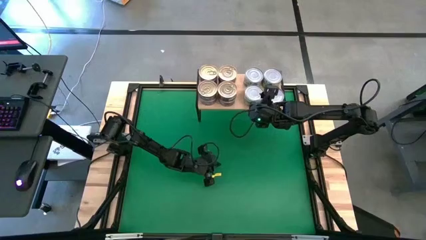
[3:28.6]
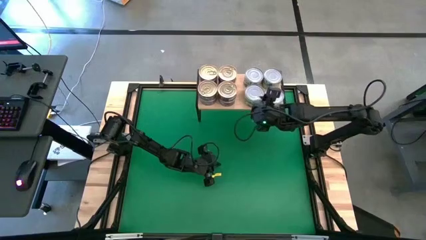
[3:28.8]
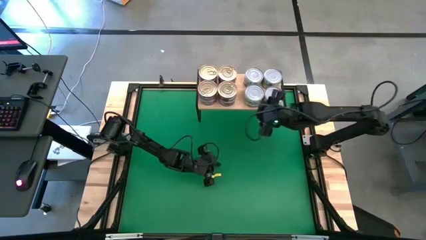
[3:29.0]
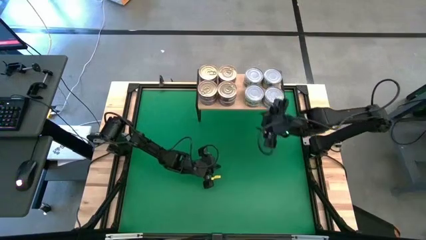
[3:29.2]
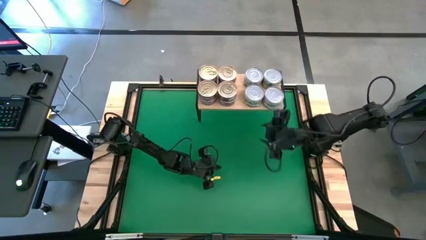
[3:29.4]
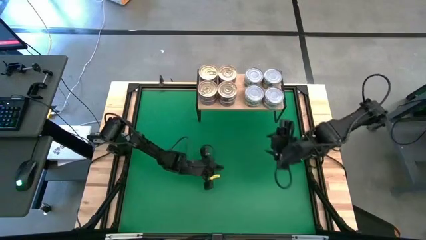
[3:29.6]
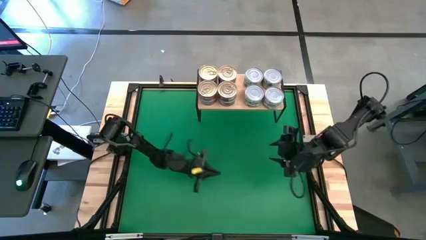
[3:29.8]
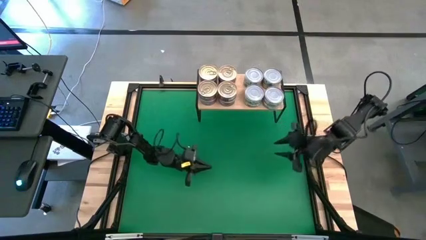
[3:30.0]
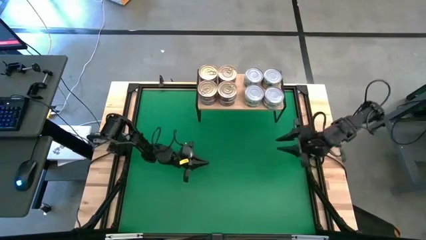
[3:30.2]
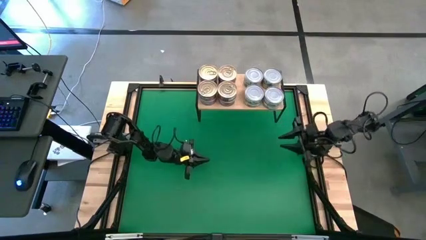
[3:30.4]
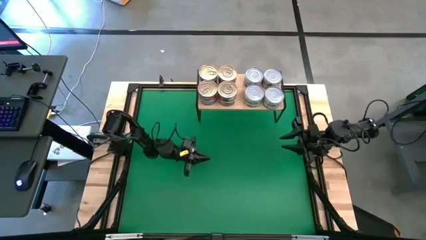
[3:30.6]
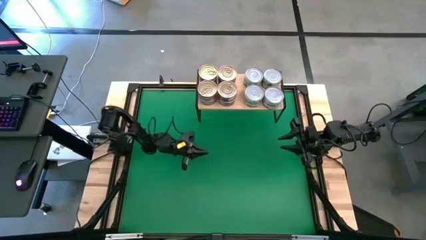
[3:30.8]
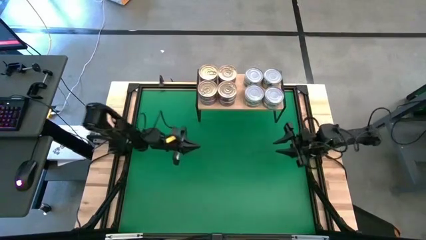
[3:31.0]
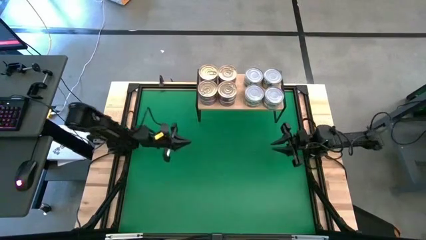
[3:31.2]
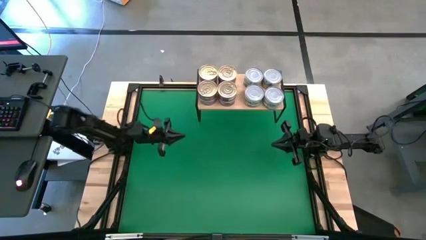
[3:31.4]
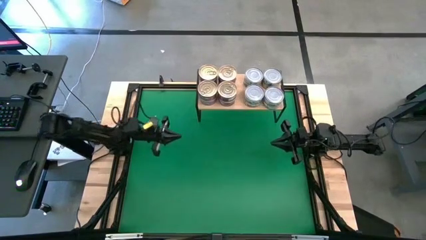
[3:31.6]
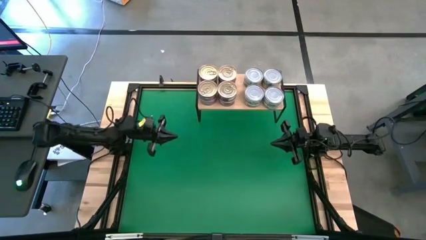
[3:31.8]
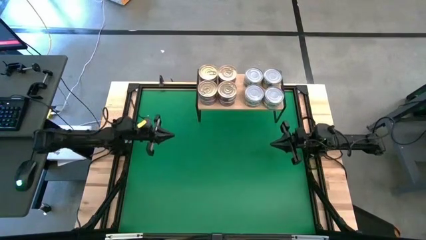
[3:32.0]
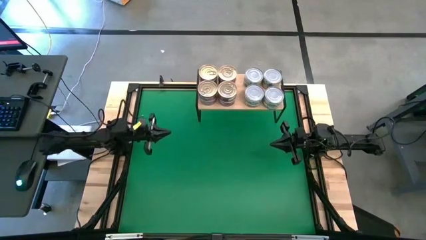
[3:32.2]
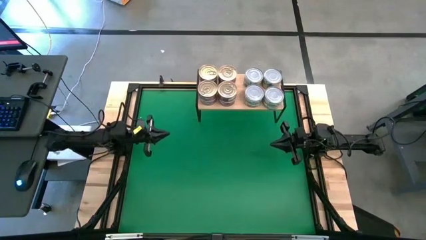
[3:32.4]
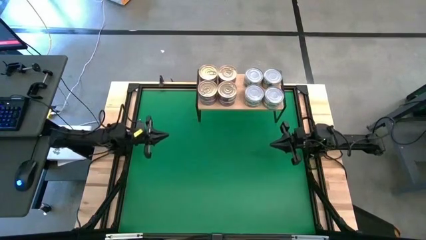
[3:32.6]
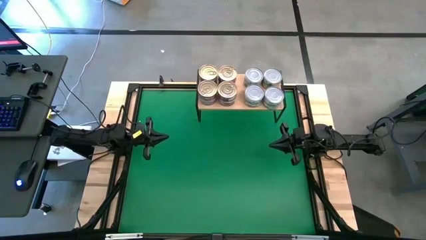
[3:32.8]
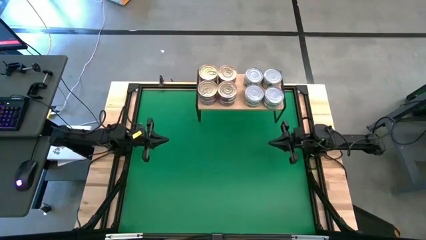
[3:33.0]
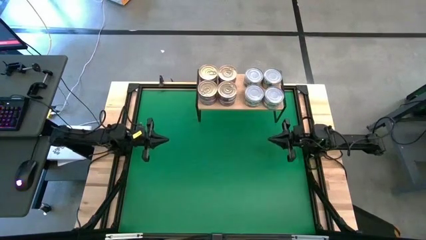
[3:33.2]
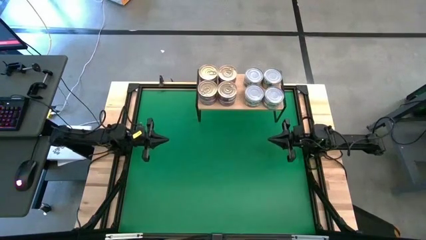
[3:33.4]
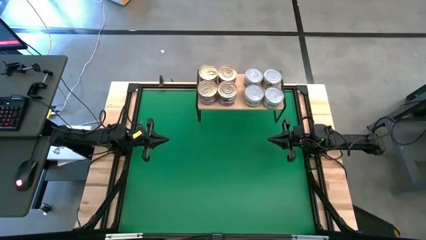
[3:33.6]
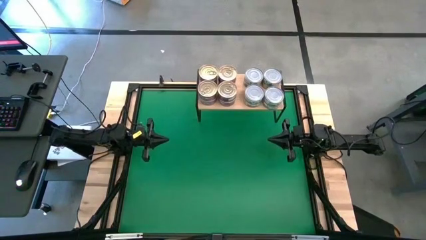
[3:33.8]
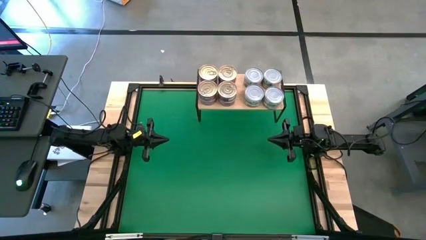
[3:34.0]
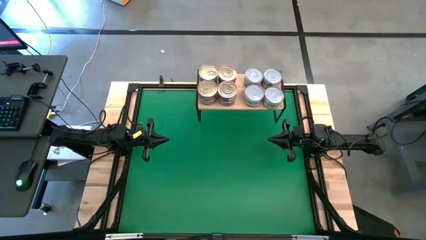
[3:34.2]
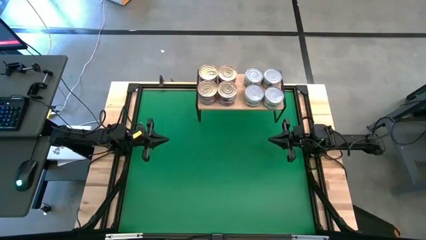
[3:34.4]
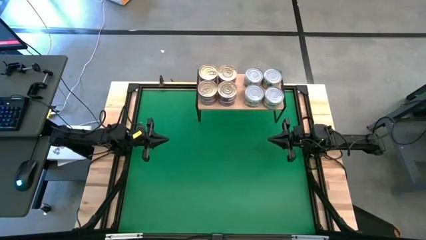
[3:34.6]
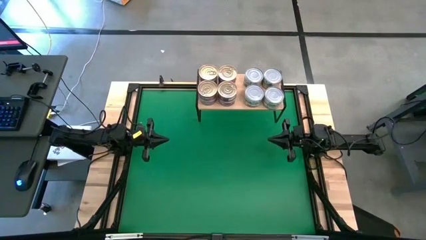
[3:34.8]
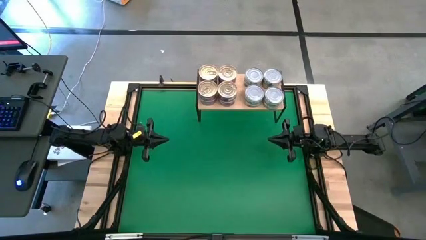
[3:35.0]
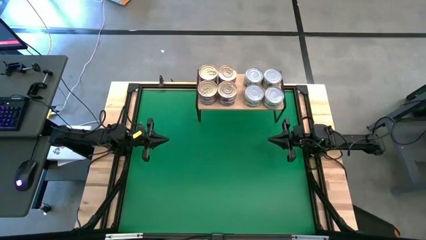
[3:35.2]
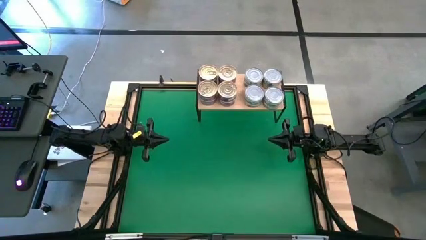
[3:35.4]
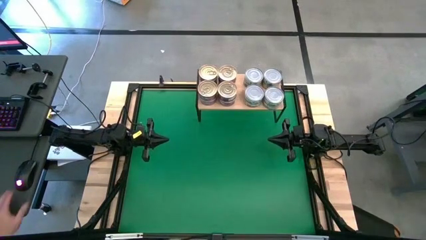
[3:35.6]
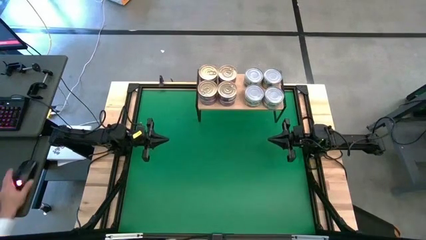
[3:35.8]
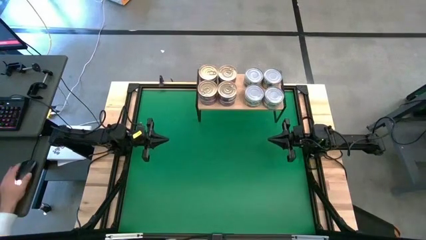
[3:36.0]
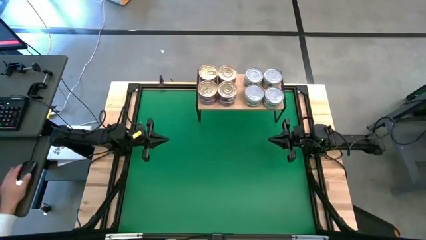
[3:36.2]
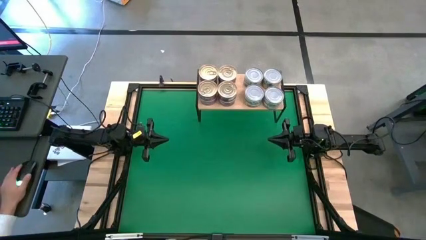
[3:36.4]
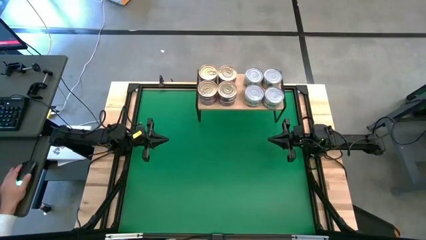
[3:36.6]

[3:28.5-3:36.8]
Task: Stack canned seafood by type on shelf
Return to Home Position

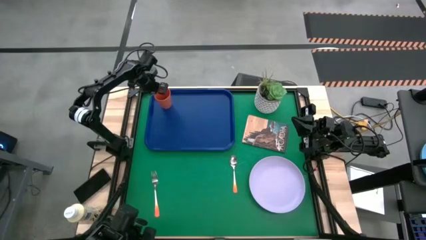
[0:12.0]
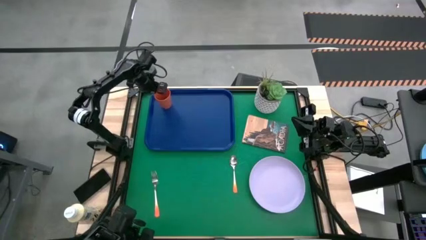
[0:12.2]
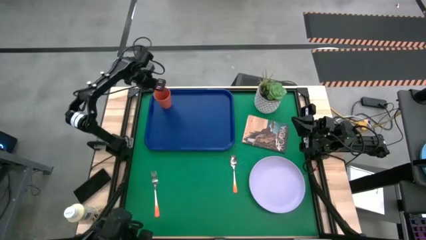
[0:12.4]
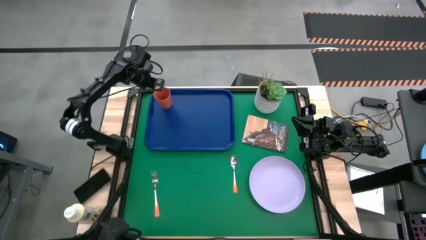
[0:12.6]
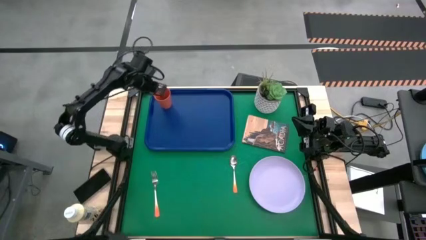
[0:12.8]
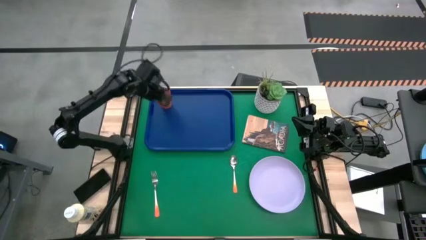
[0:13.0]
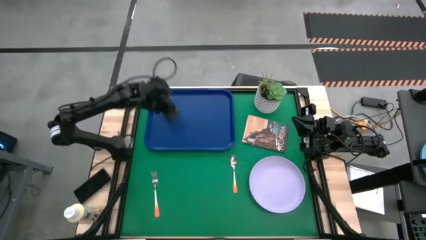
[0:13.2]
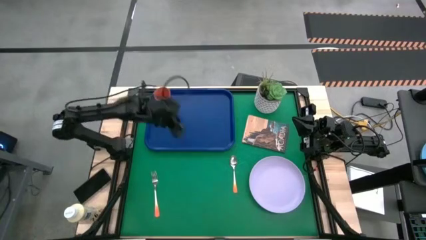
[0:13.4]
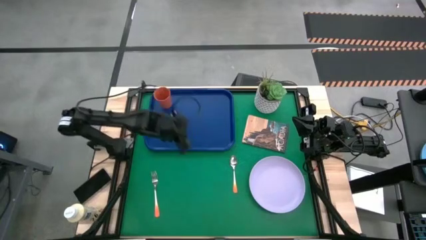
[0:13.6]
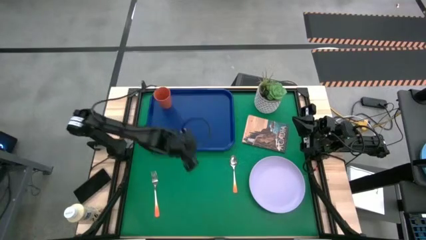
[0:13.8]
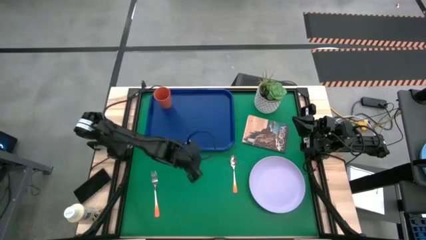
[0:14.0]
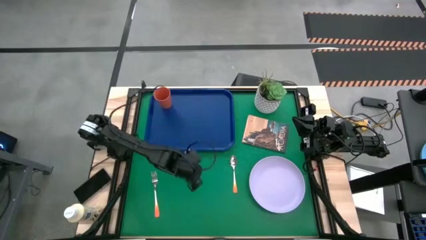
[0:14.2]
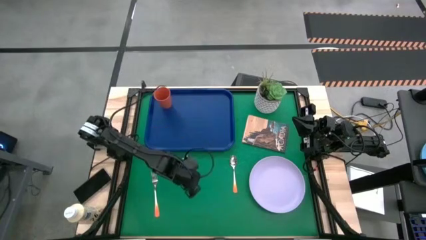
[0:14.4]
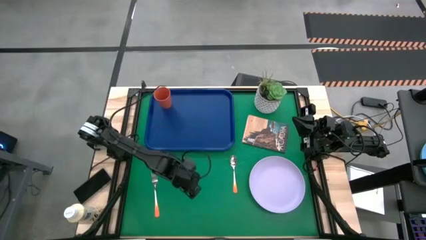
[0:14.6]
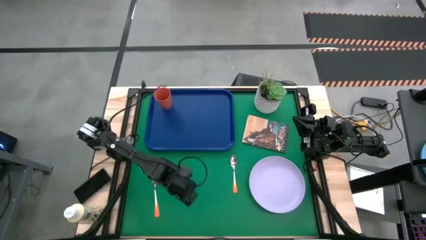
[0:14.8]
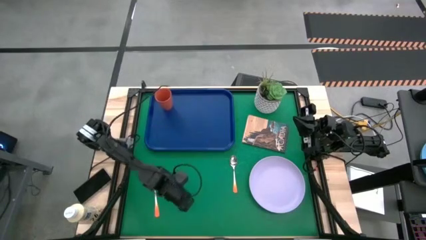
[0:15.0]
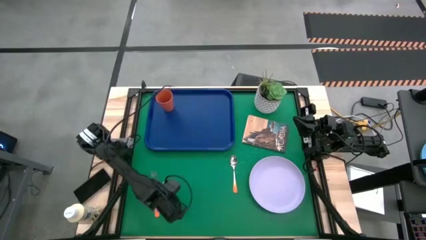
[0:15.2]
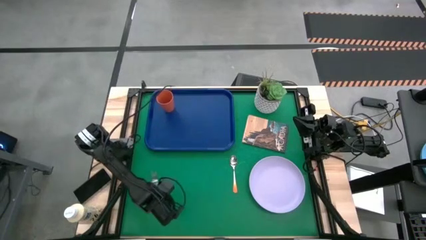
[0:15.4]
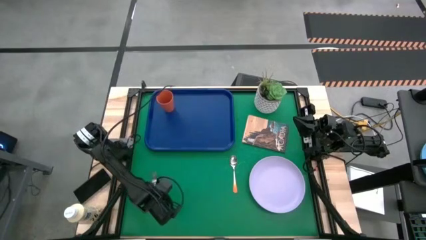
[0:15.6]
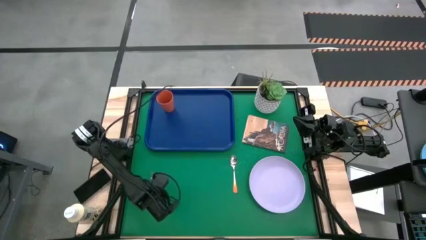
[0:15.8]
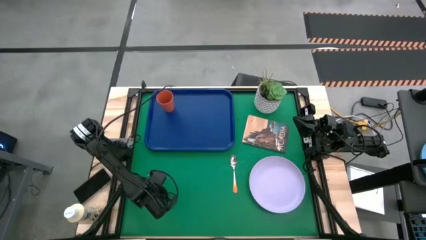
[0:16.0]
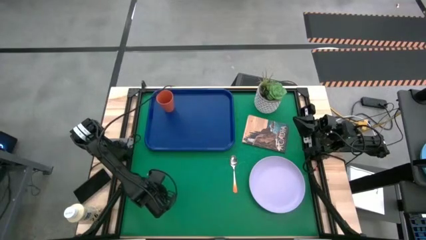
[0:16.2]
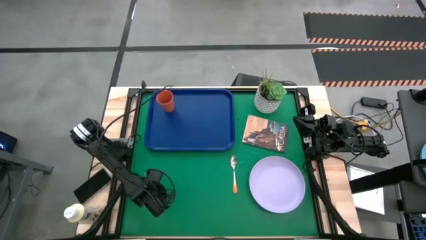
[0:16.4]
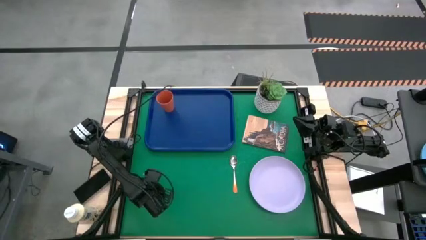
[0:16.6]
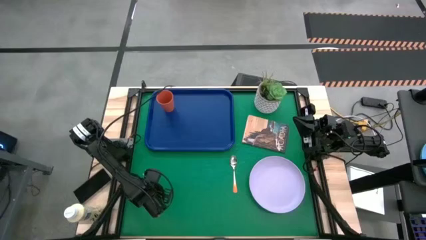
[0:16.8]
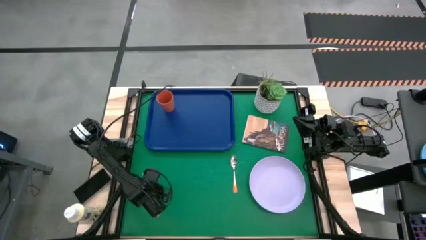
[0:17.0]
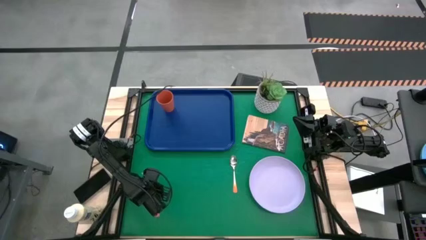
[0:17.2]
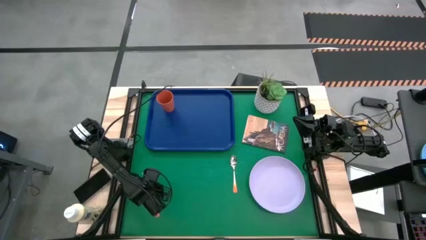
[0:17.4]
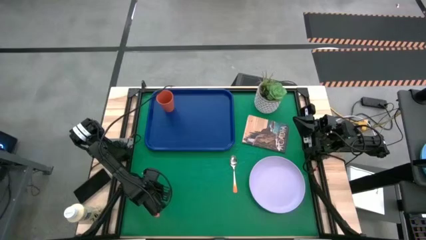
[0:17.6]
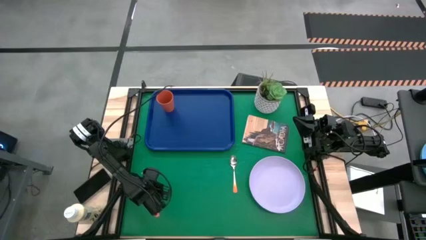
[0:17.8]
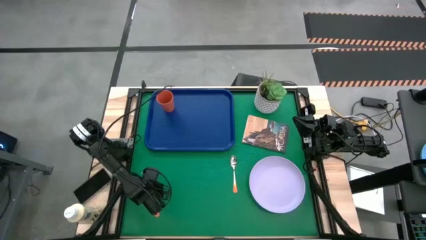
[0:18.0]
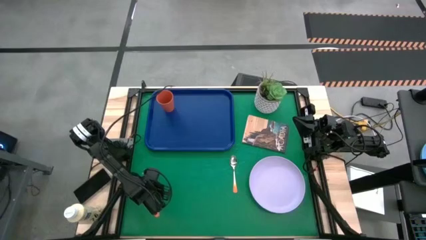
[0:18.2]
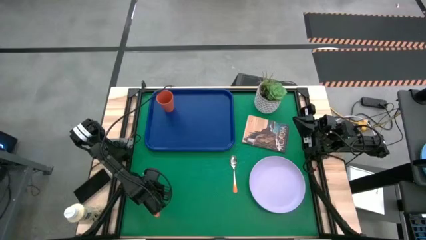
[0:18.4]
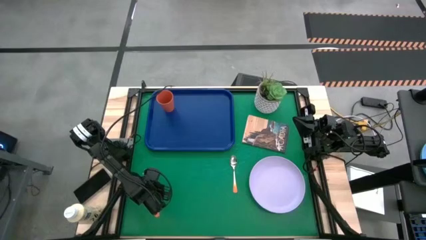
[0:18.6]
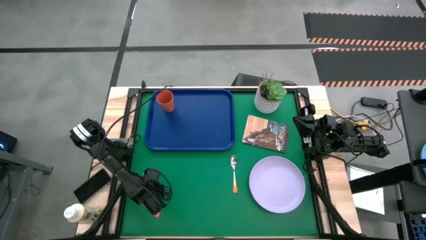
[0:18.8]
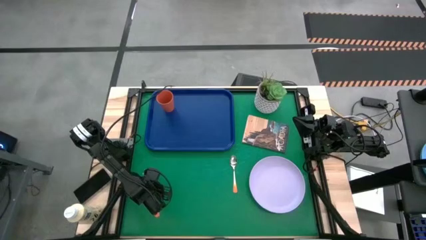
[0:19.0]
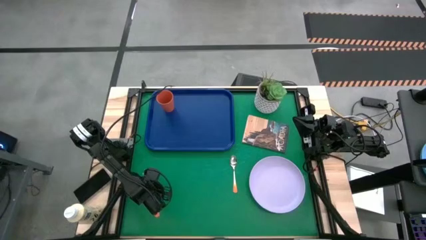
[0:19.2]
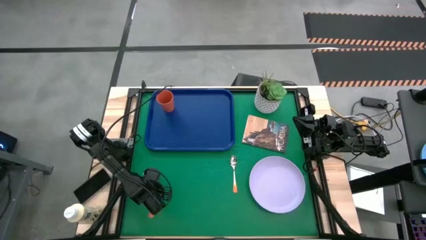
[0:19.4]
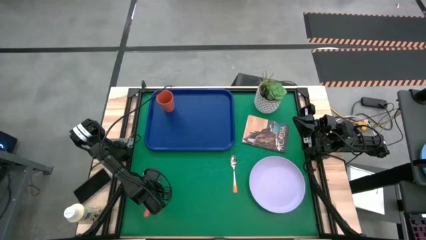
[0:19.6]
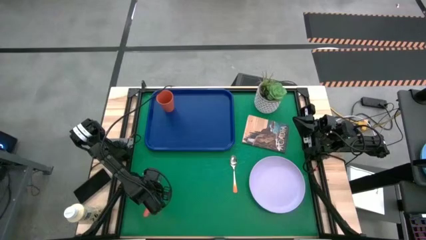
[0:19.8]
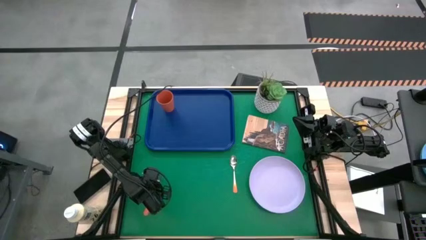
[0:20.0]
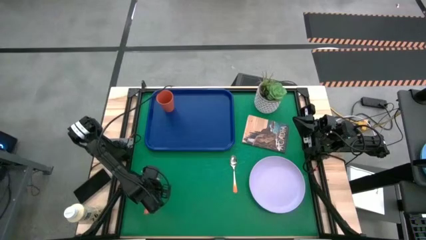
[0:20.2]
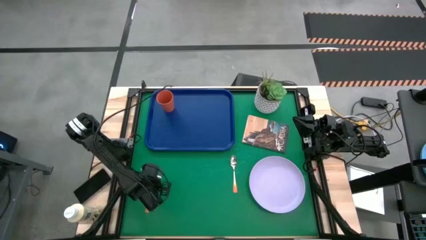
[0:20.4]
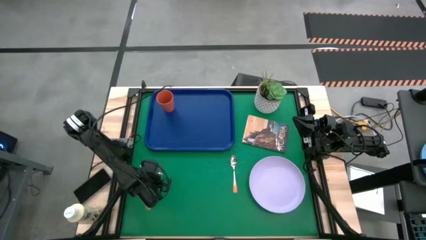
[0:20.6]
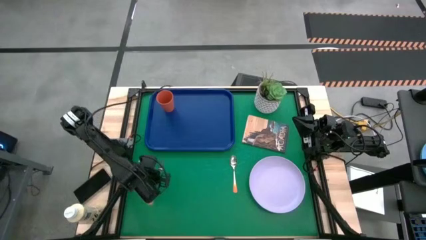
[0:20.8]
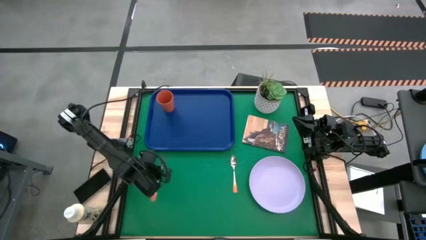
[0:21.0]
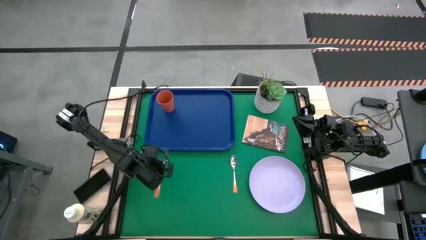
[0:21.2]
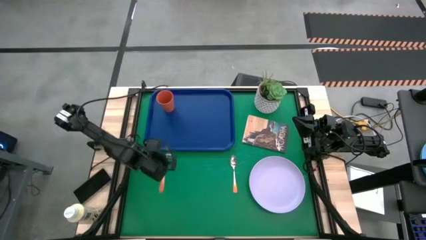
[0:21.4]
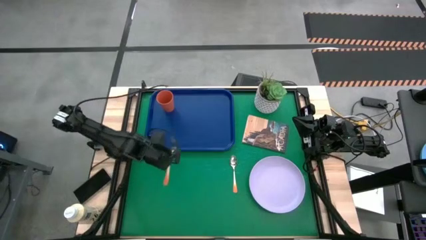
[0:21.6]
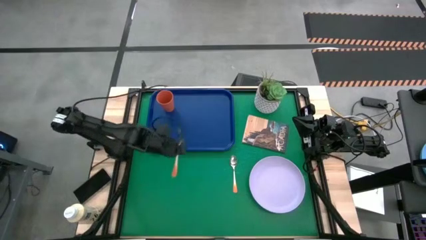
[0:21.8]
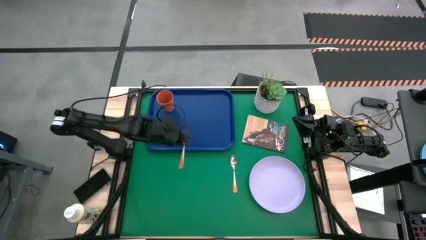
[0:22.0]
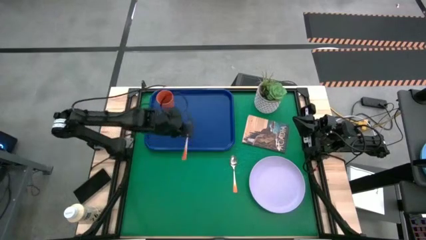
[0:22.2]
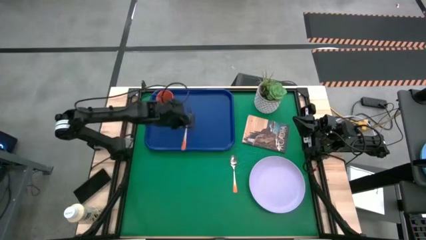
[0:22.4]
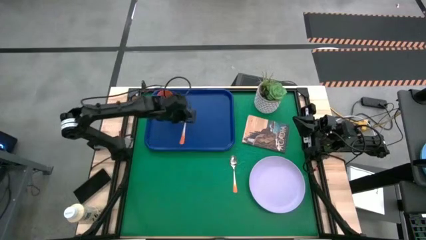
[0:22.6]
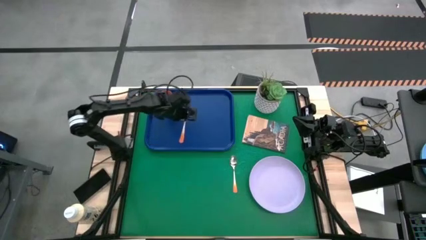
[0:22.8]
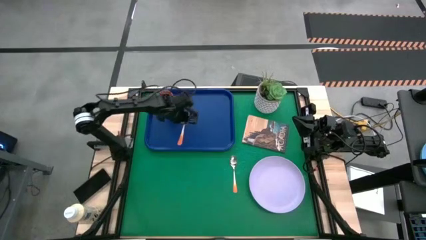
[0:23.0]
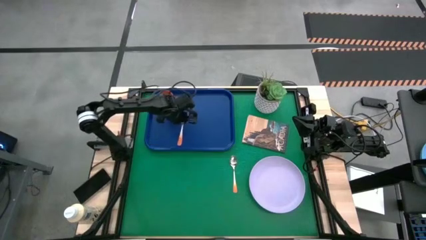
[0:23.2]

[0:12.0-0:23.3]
Task: Pick and place plate/cup/fork/spoon on tray
Put the orange fork on the blue tray to the bottom right of the orange cup
